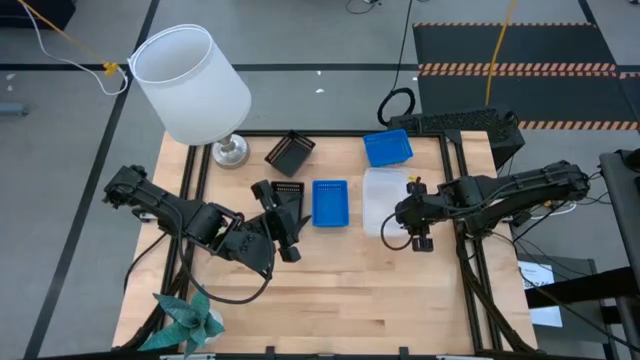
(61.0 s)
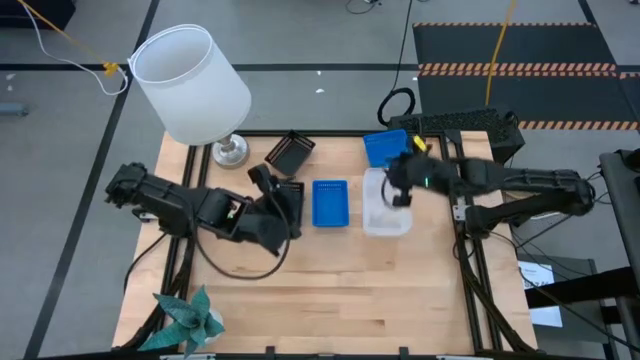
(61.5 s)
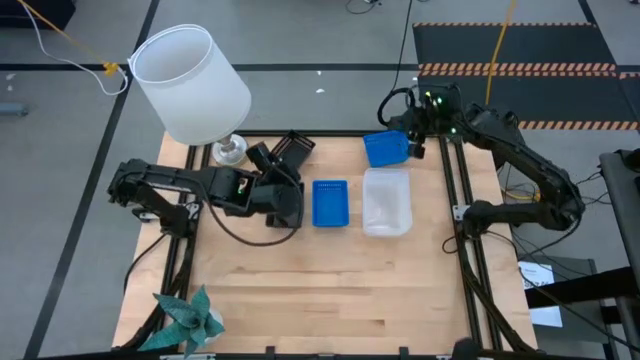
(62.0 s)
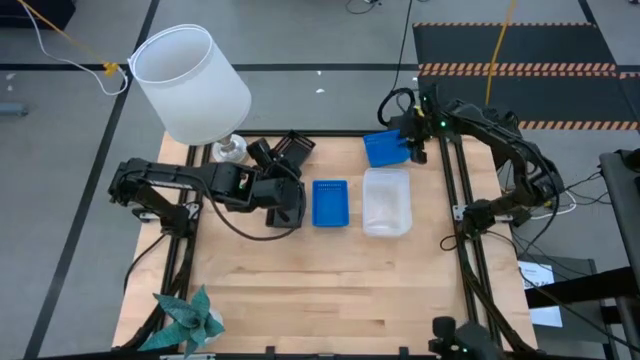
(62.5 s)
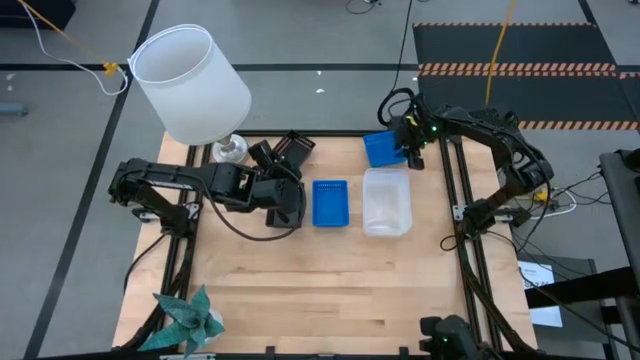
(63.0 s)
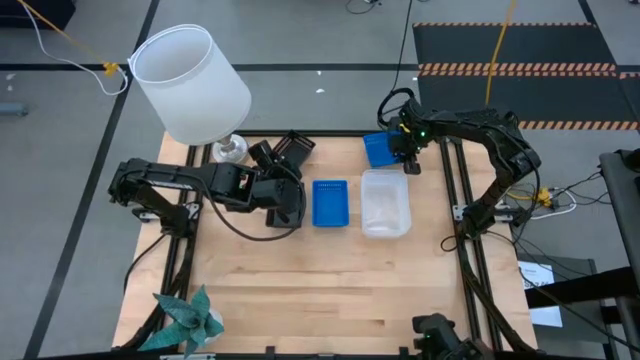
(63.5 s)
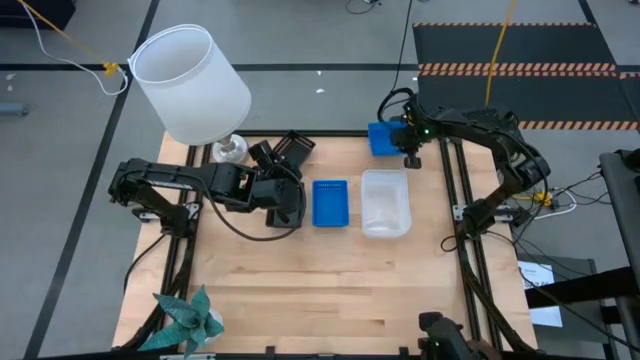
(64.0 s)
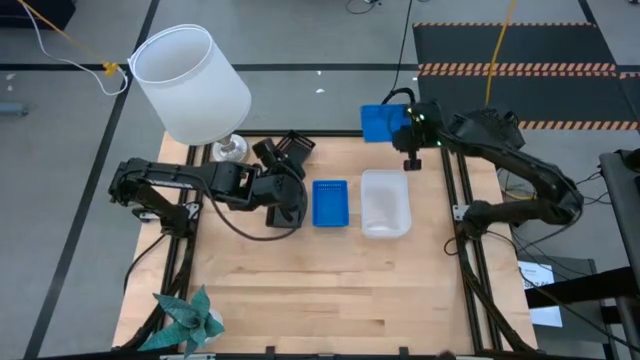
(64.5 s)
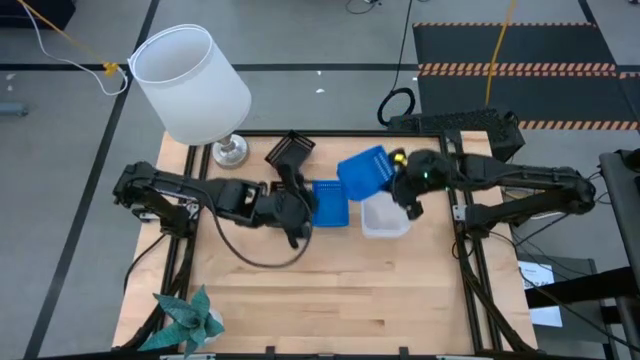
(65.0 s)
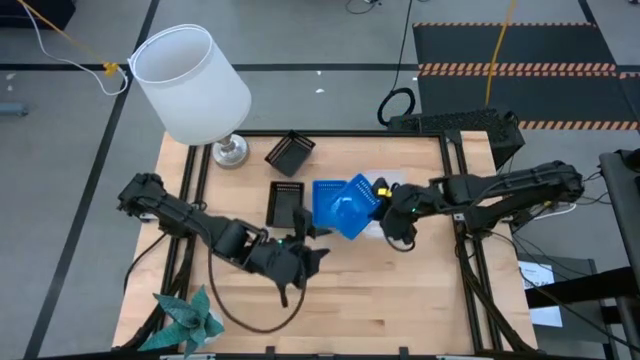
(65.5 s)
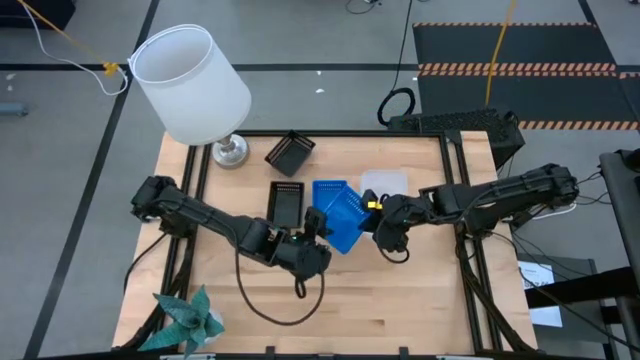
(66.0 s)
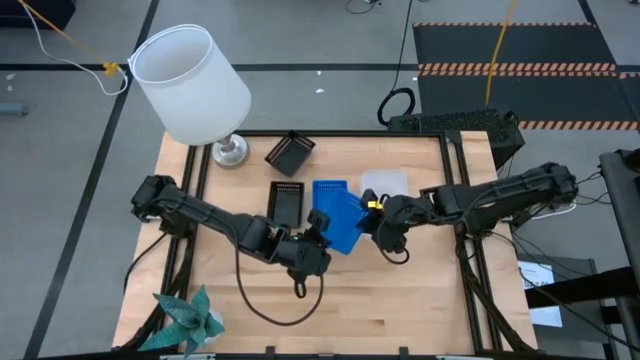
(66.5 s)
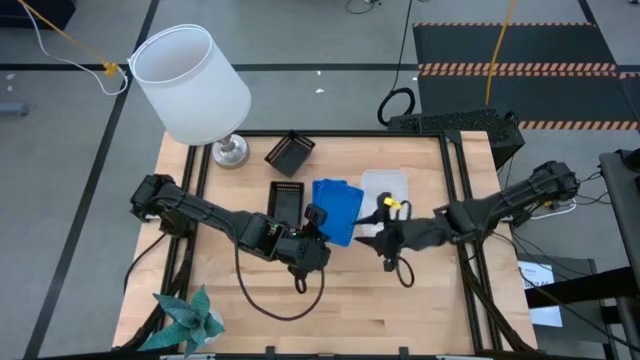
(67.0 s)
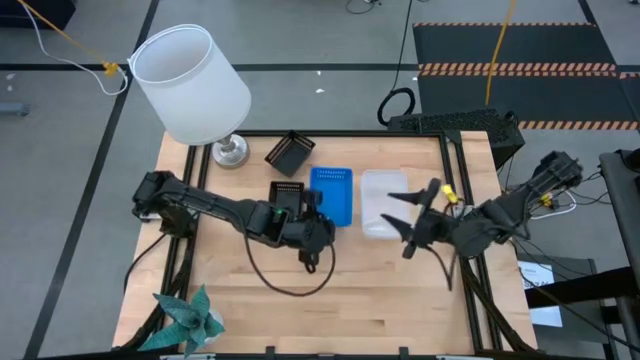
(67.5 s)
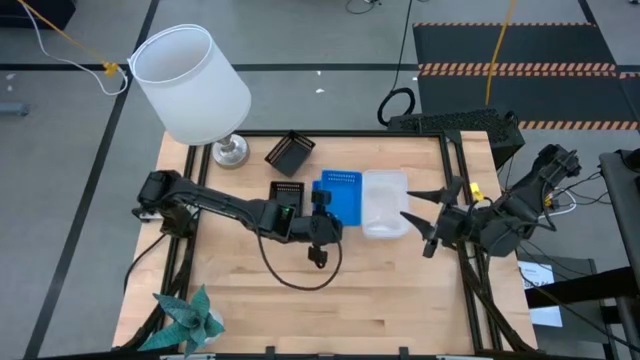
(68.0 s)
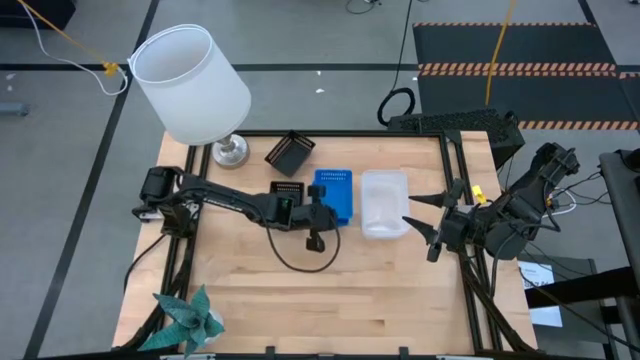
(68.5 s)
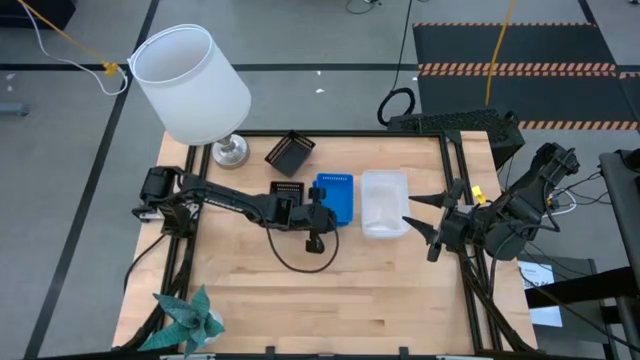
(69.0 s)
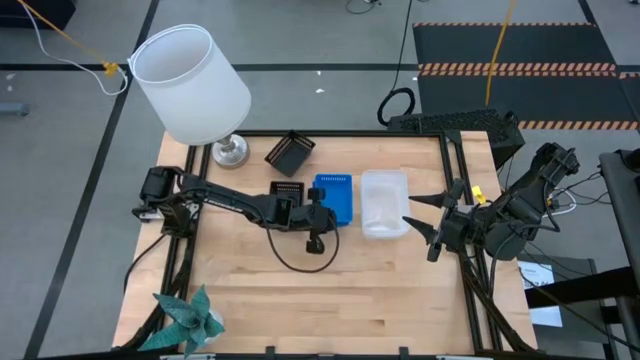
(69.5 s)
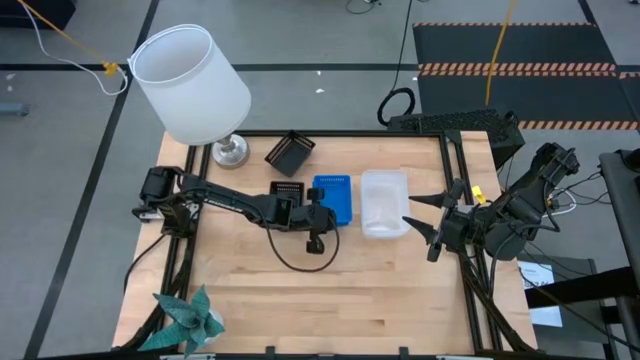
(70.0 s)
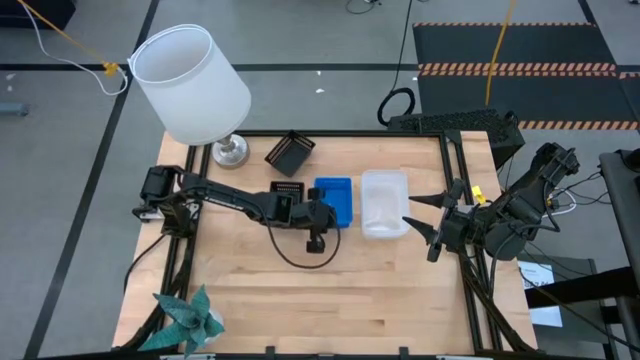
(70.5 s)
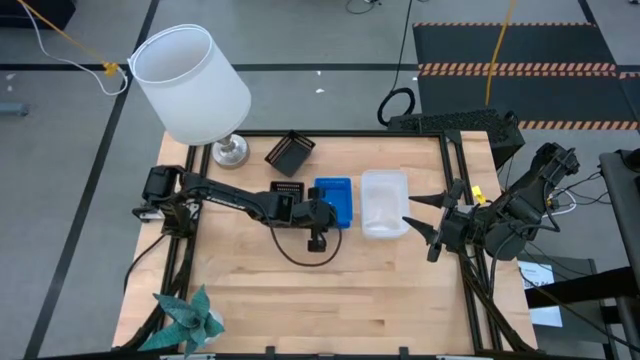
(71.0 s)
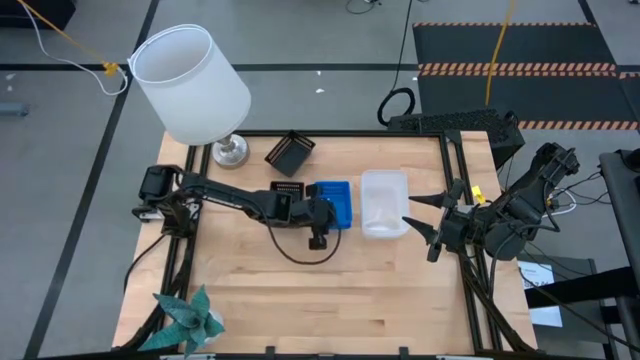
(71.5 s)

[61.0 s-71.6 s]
Stack the top blue bin on top of the bottom blue bin

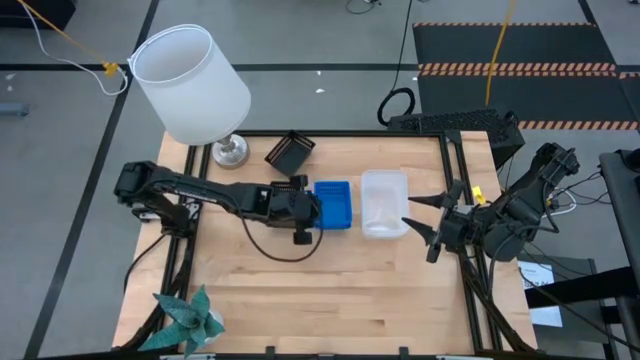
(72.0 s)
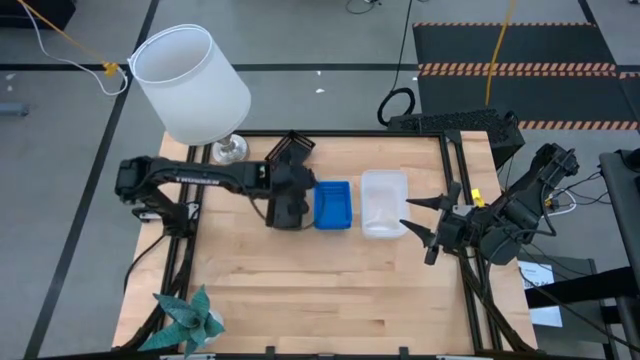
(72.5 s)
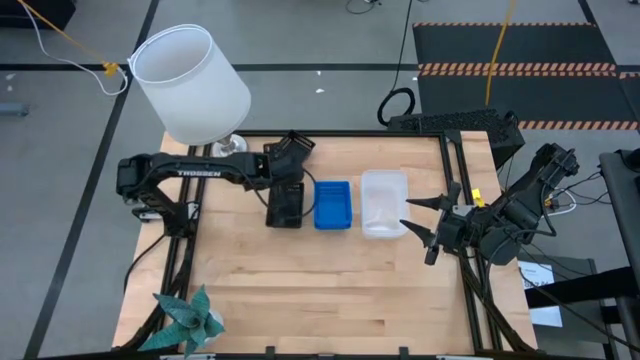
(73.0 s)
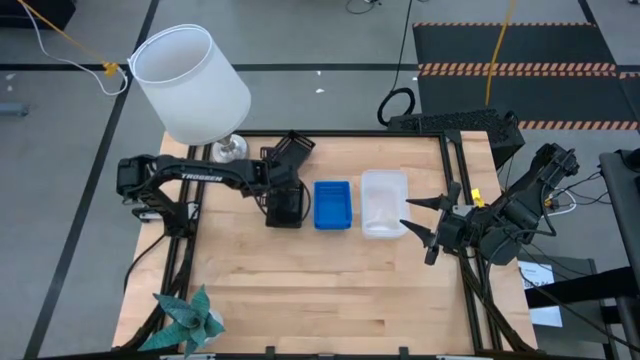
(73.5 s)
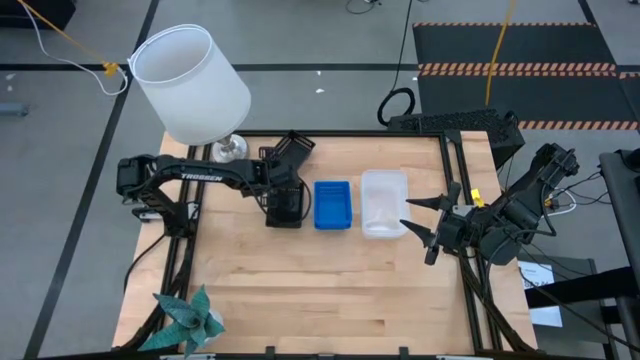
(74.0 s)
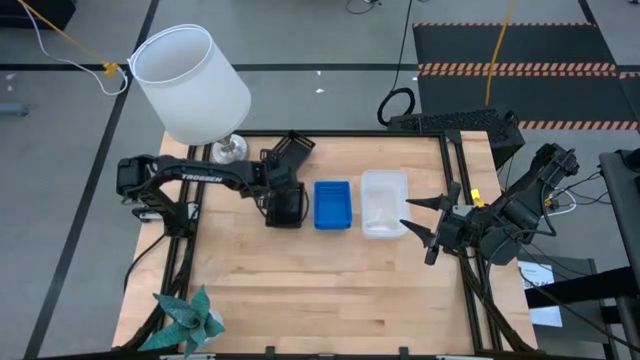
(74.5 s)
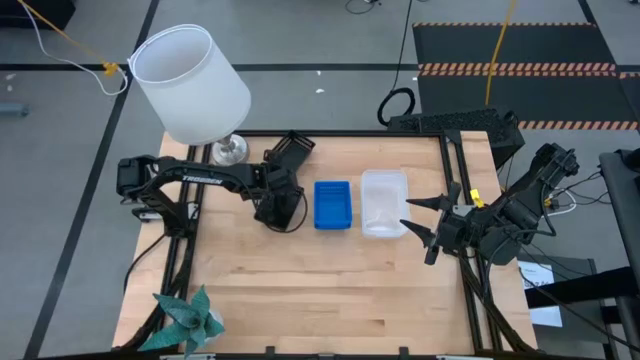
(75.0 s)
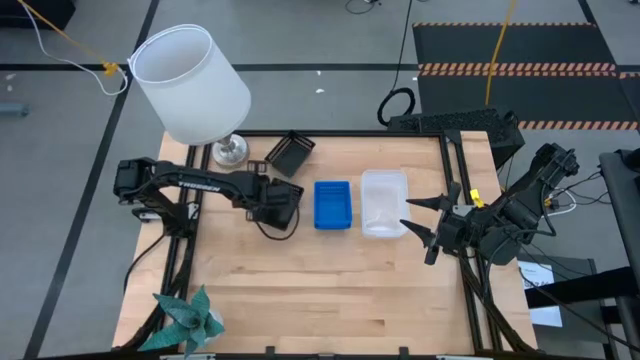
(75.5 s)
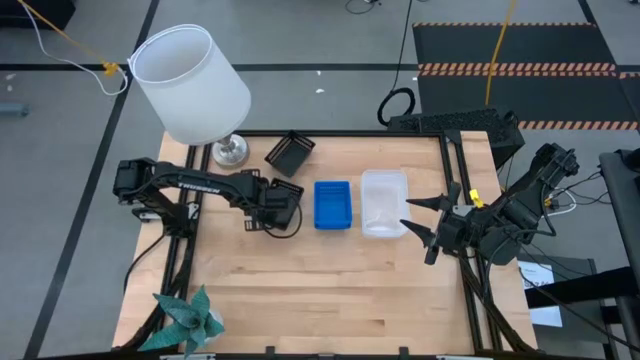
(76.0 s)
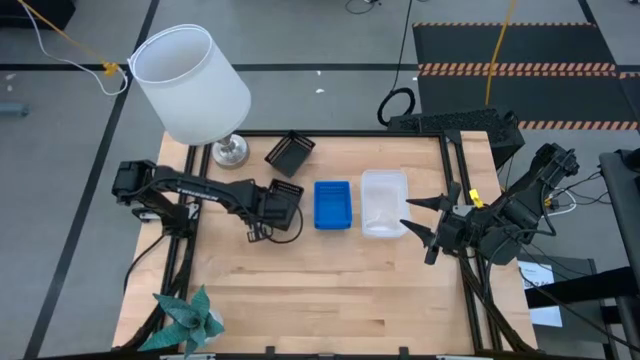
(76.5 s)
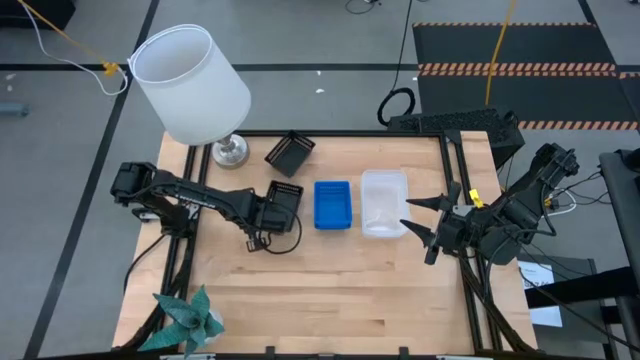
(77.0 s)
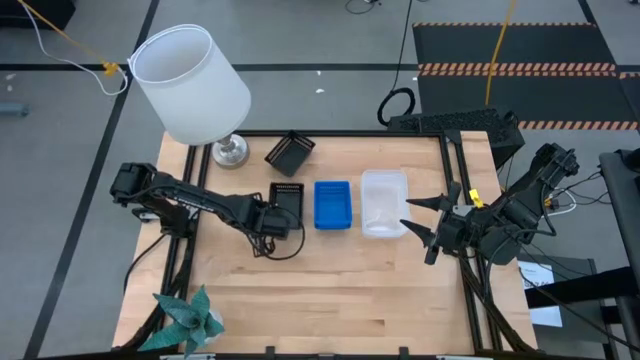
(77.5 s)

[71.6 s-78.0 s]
Adjust the stacked black bins

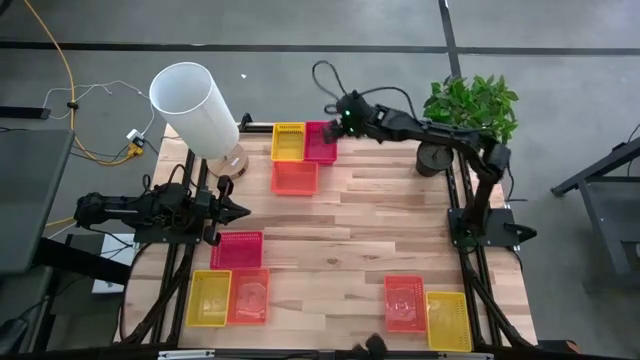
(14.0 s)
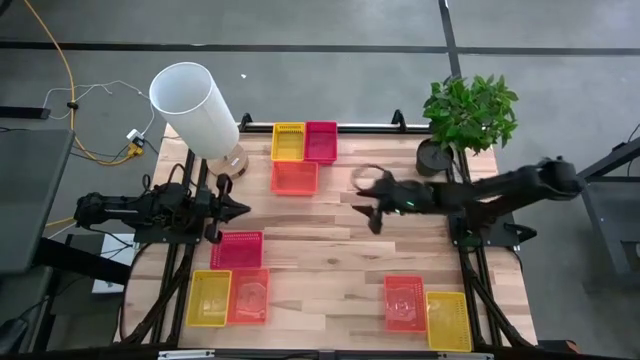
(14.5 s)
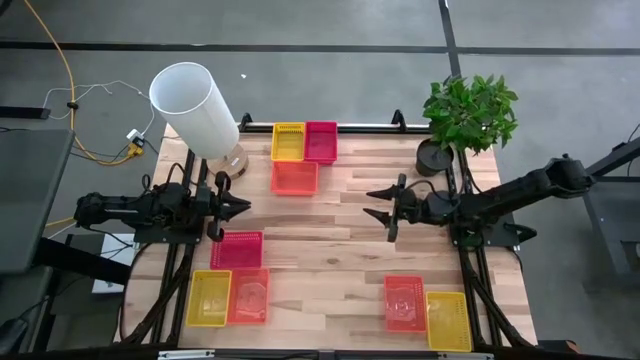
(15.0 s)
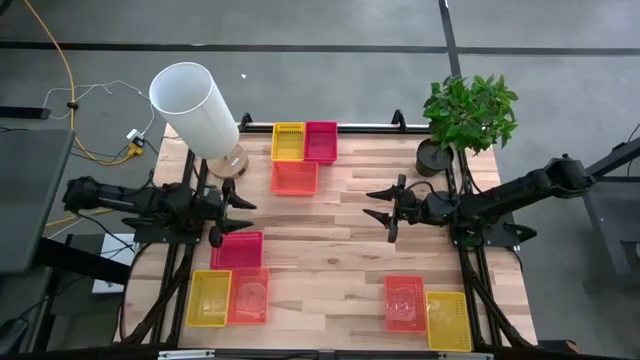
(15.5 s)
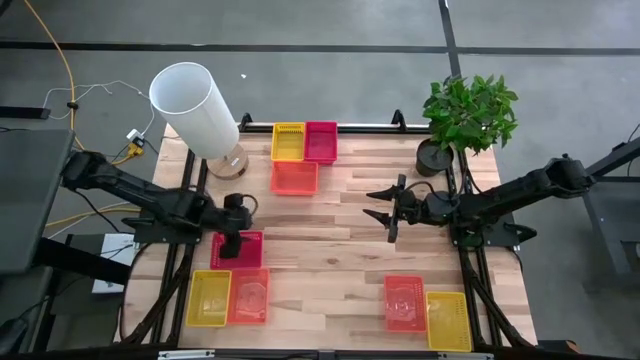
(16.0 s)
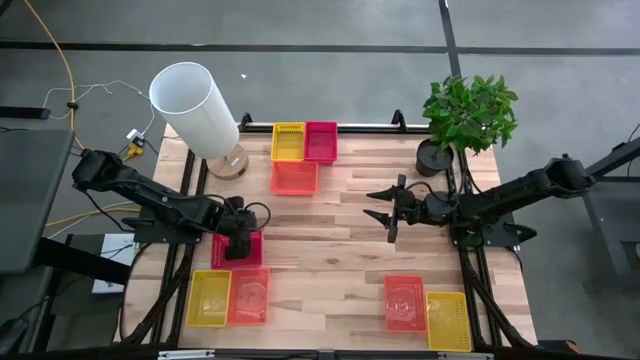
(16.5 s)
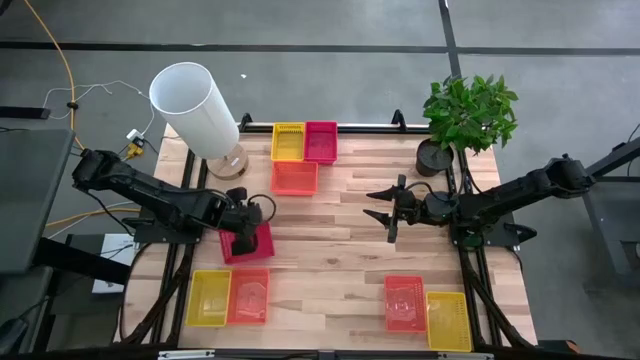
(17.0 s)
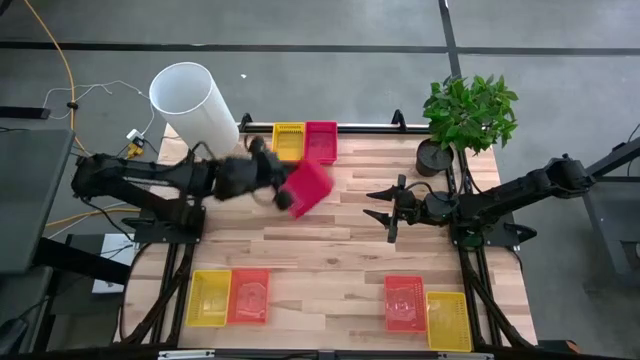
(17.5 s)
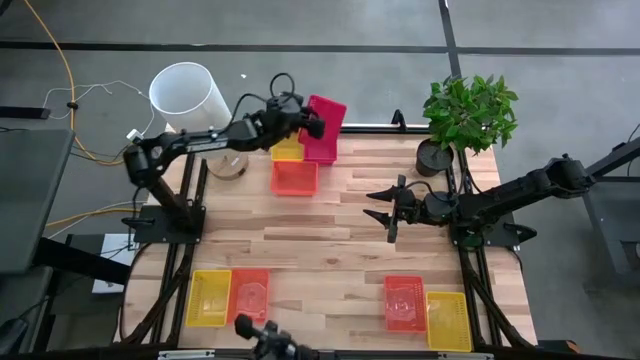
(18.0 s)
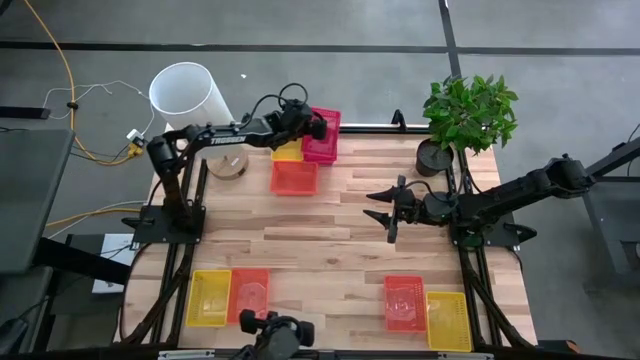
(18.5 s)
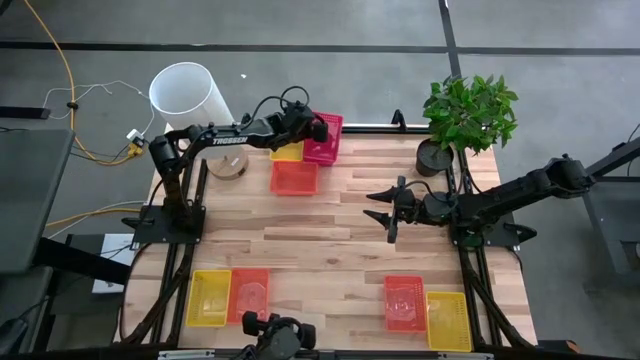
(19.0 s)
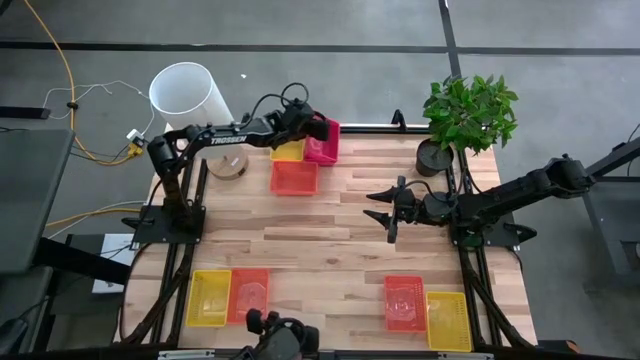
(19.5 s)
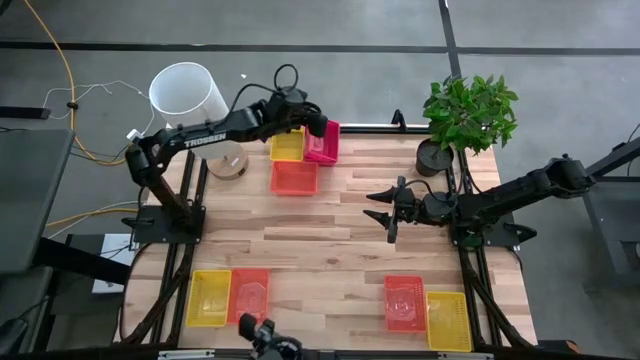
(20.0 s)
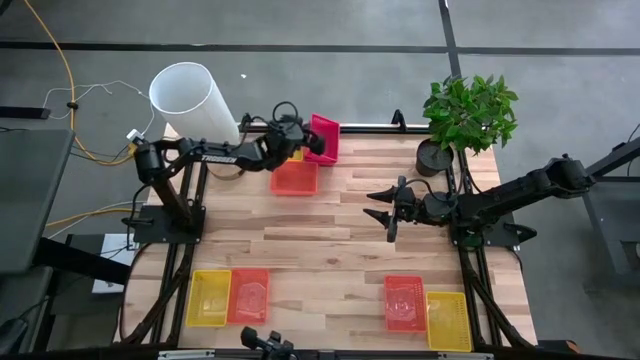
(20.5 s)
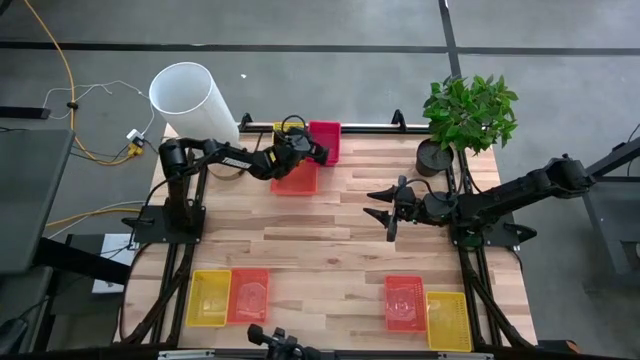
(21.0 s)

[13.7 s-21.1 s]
Stack the bottom red bin on top of the top red bin
